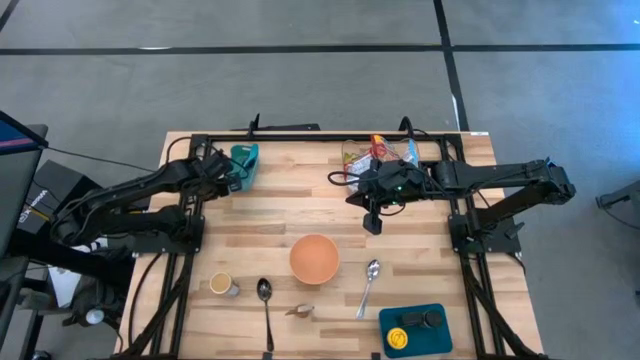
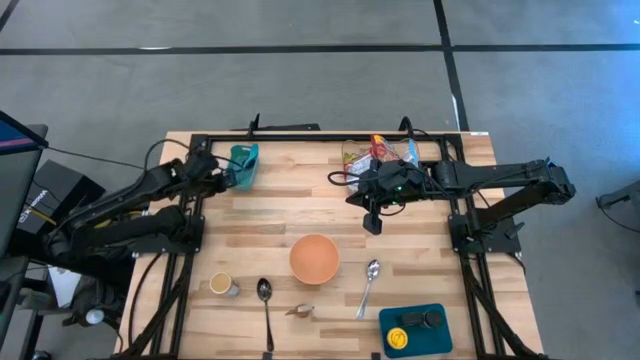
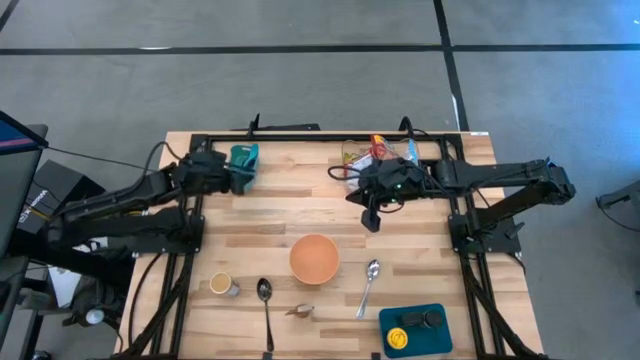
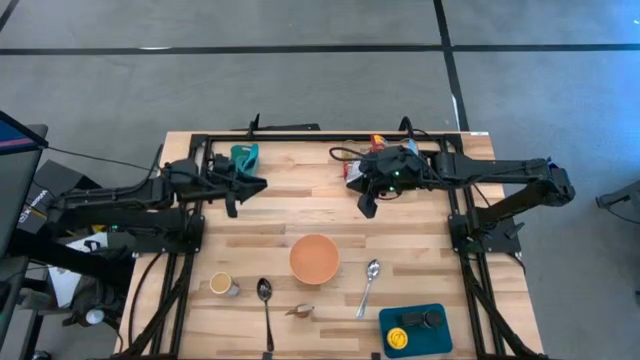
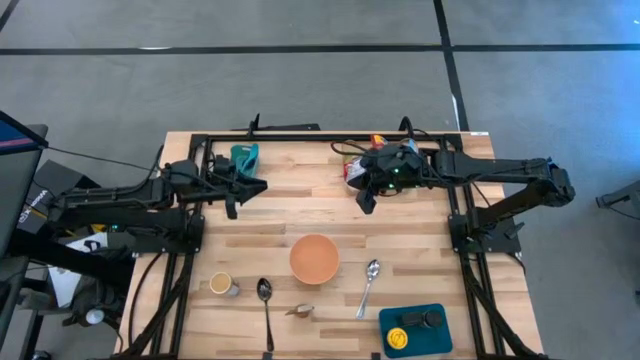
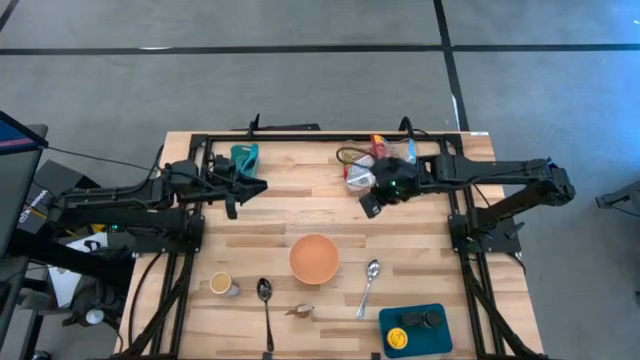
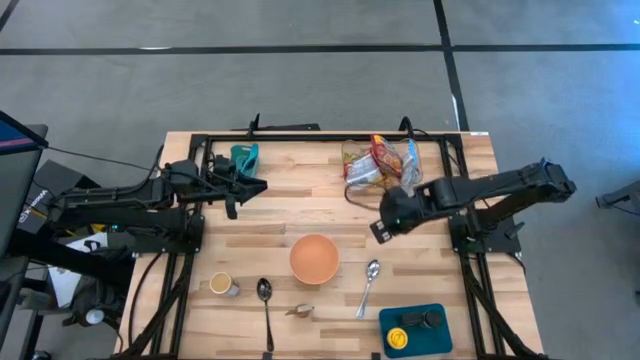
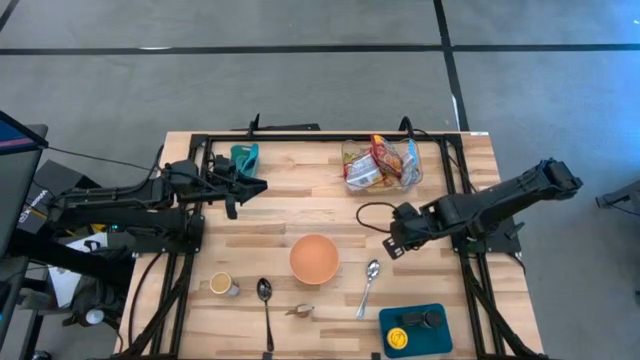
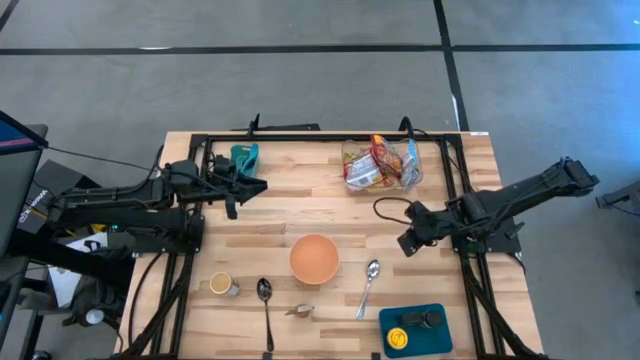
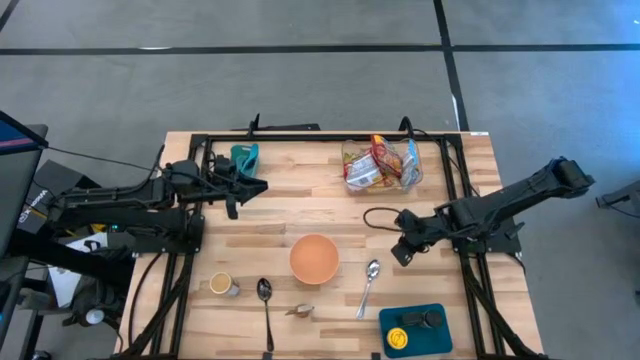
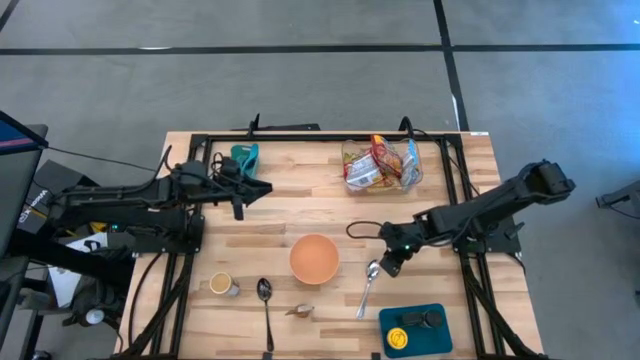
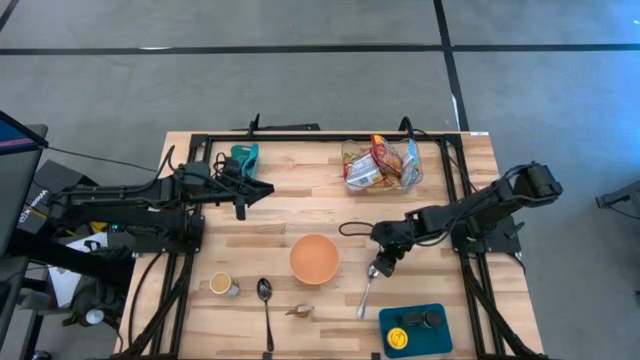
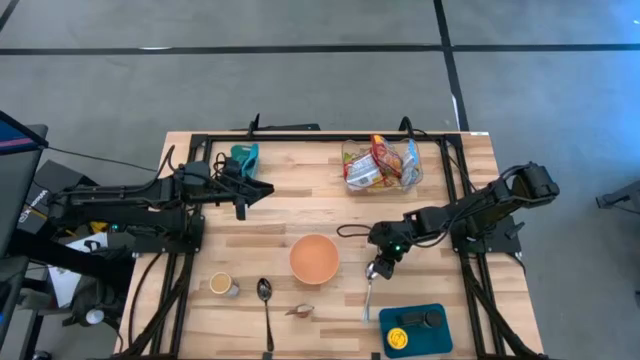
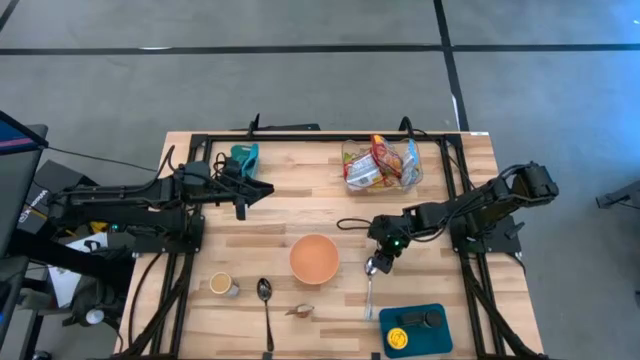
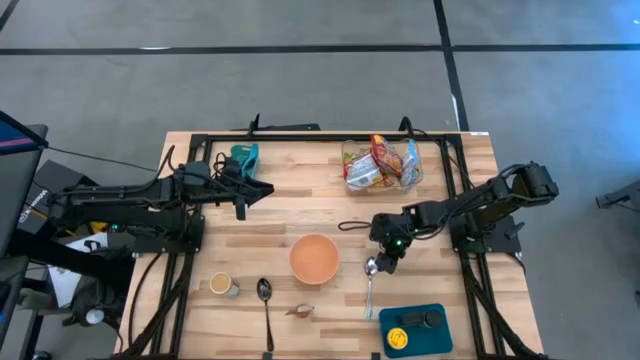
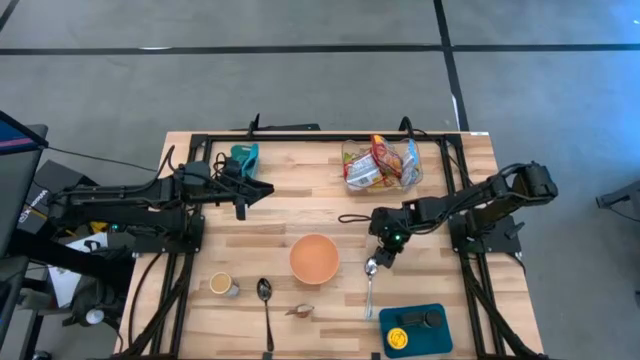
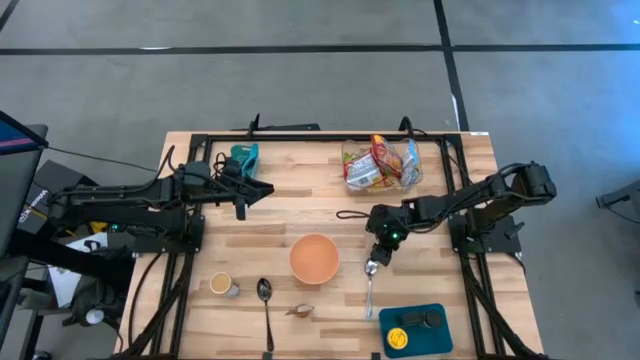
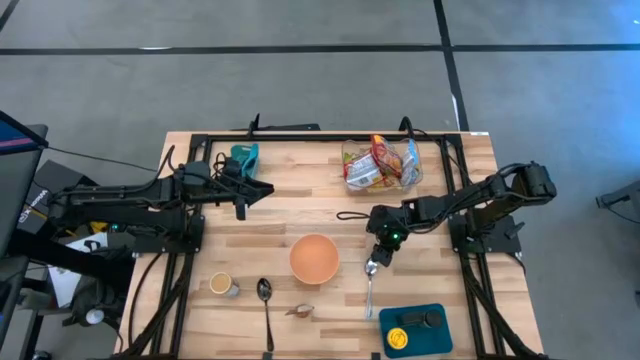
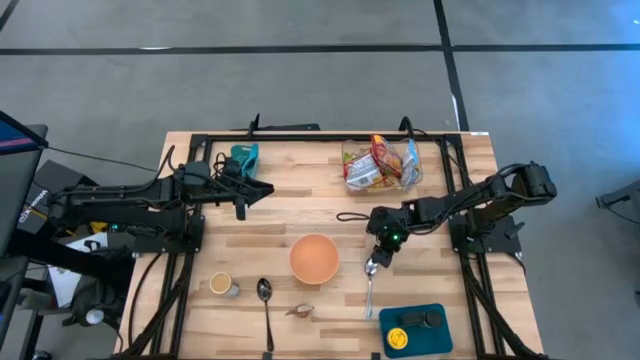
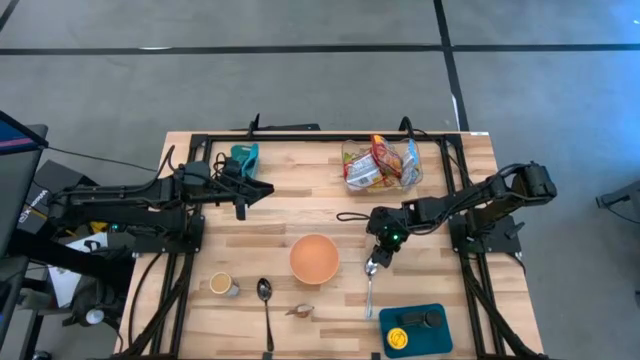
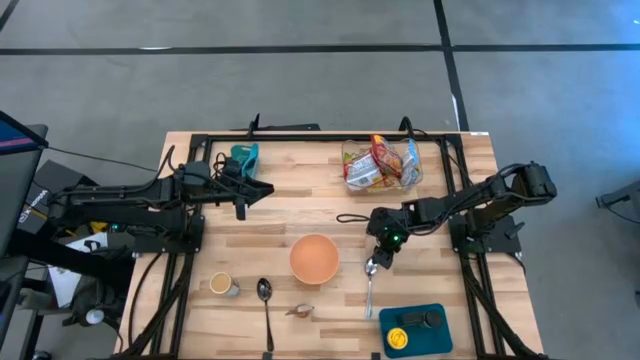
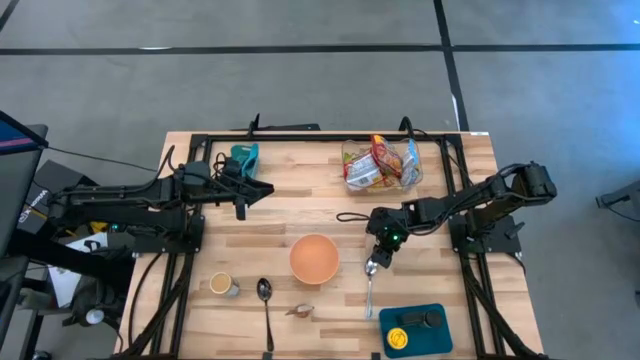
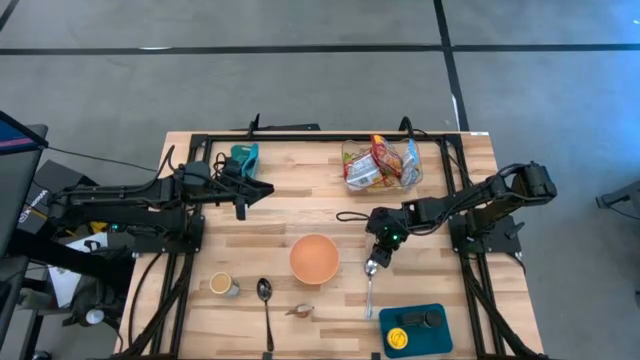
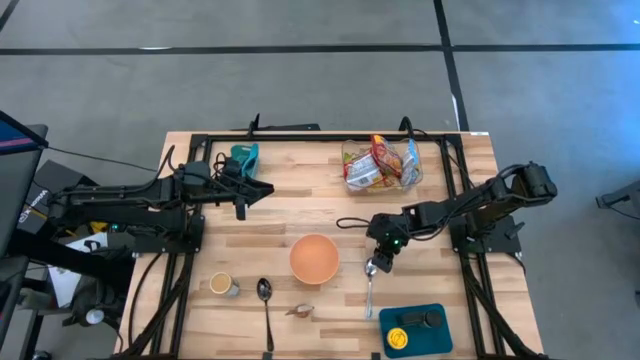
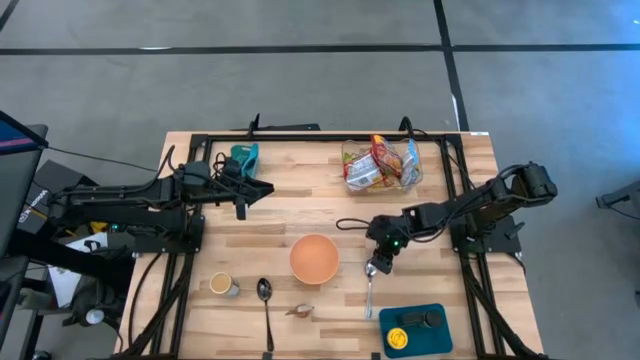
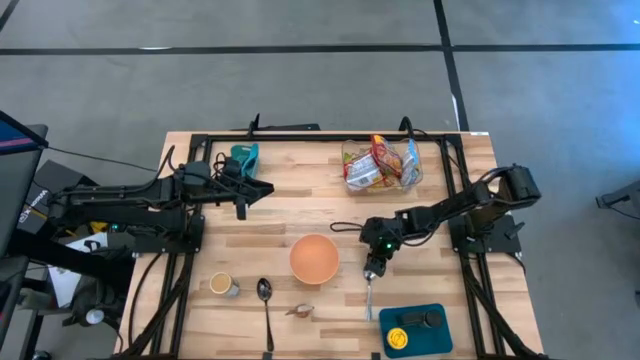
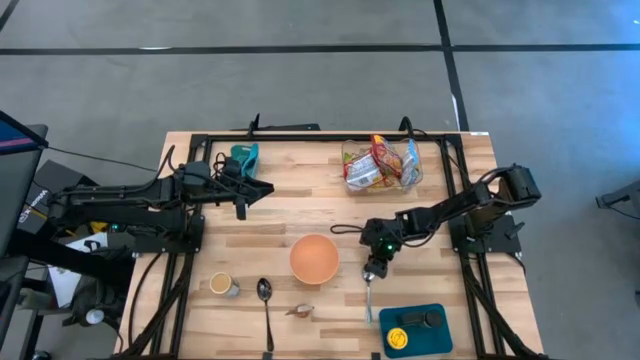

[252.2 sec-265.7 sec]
Task: Pick & Place Food Item
Put the silver spoon into the light green bin

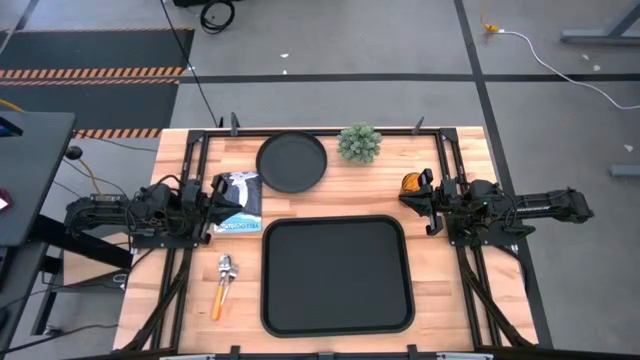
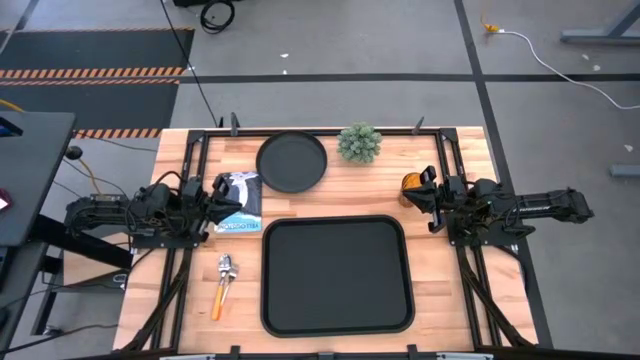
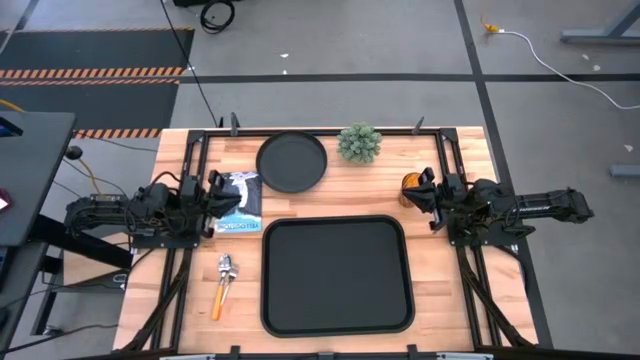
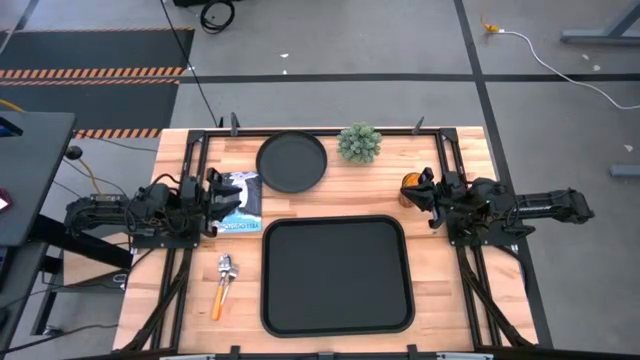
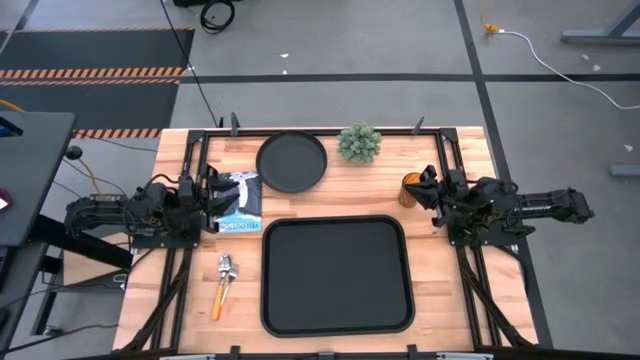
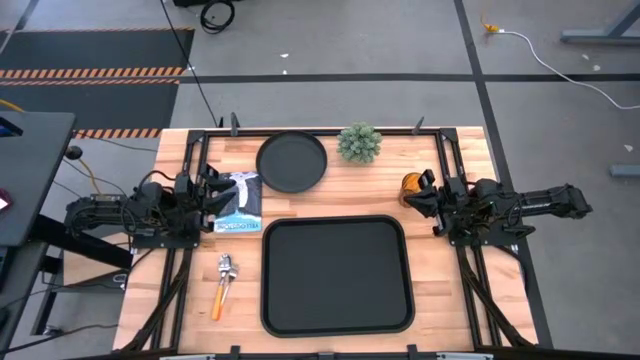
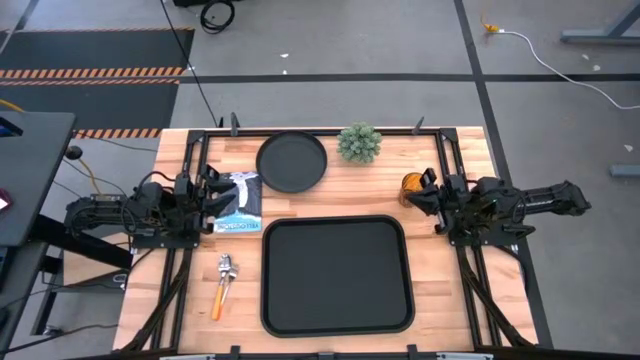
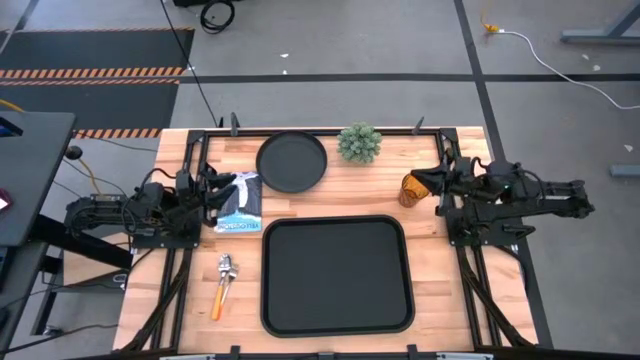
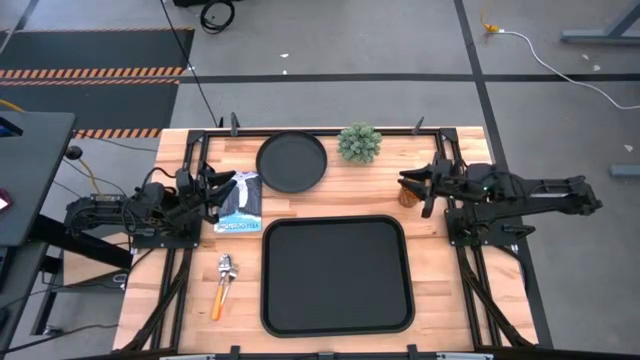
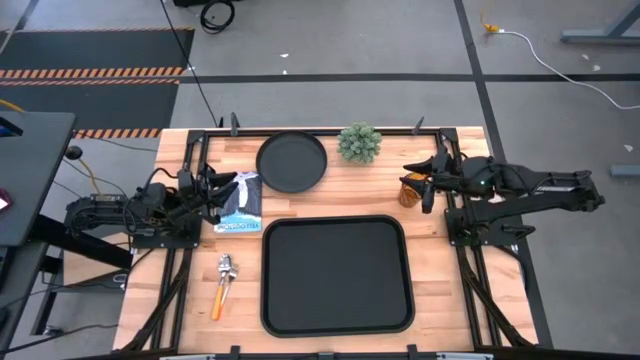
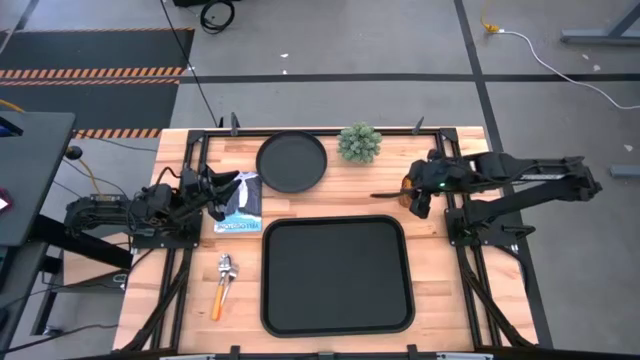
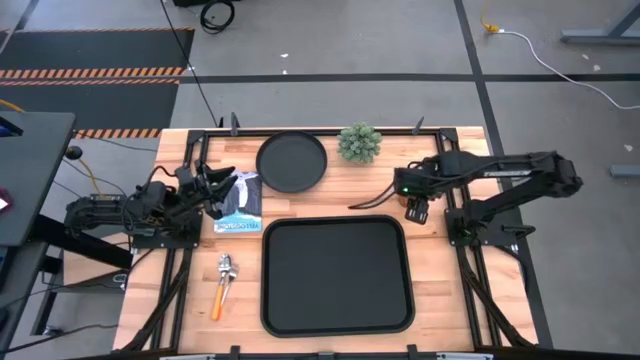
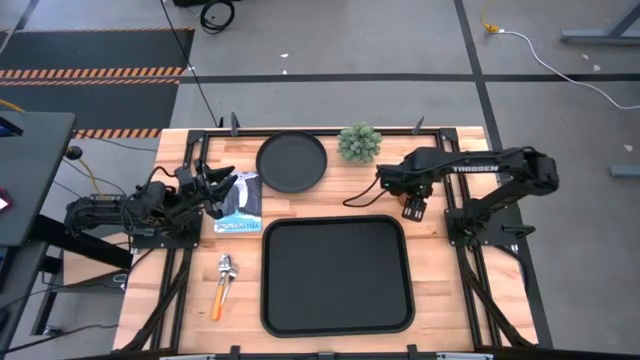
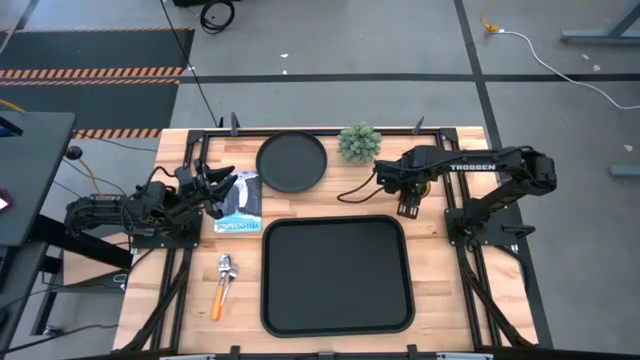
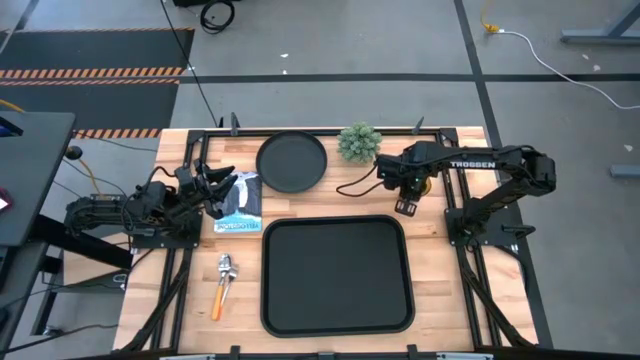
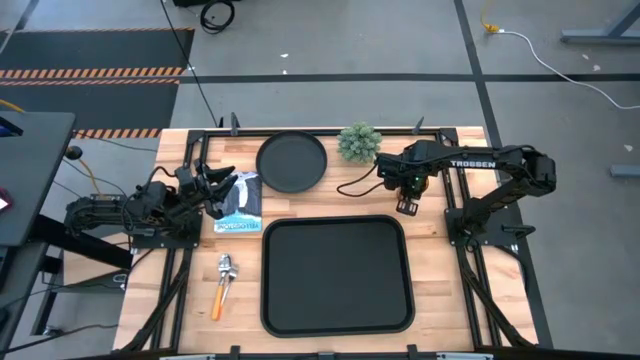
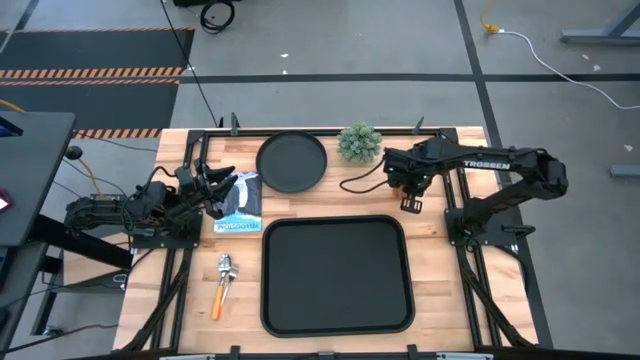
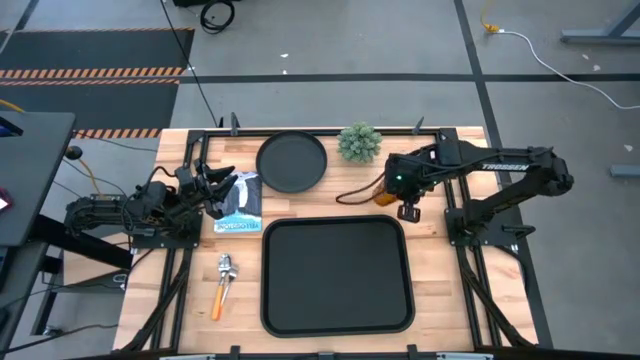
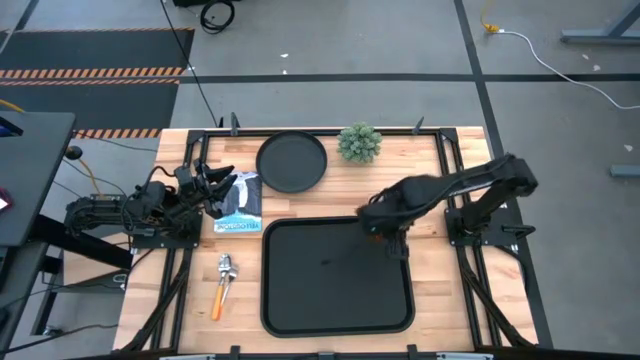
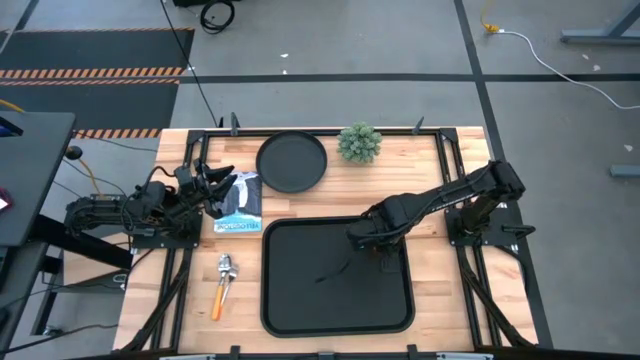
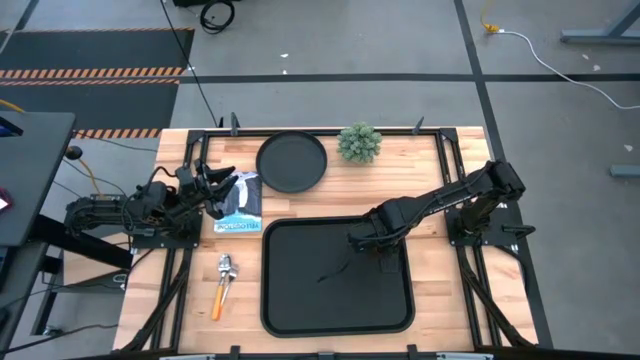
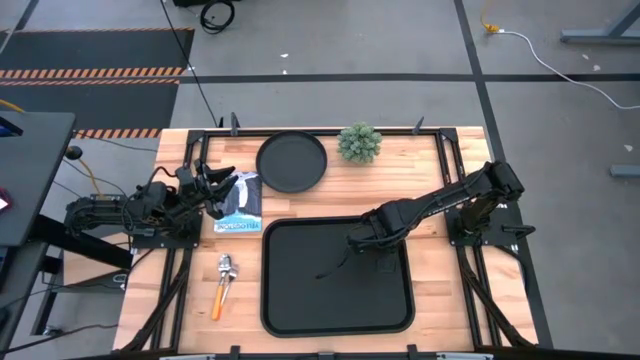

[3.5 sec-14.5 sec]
Task: Pick and place plate/cup/fork/spoon on tray
Put the yellow cup on the black tray
